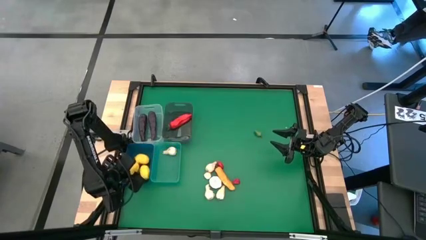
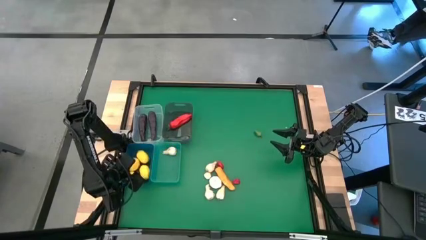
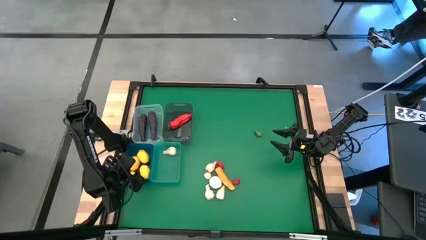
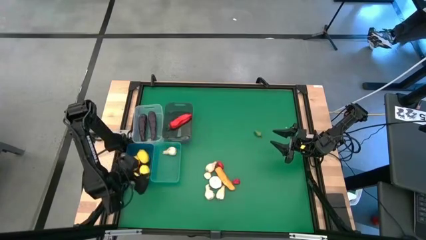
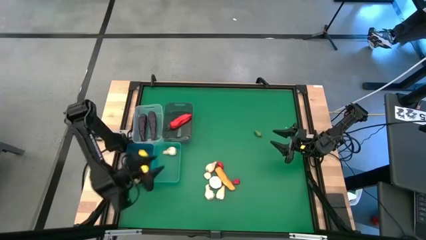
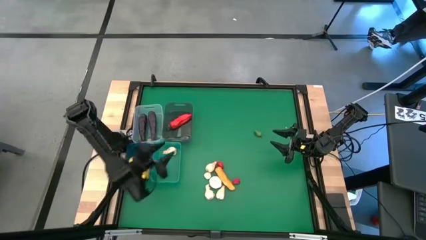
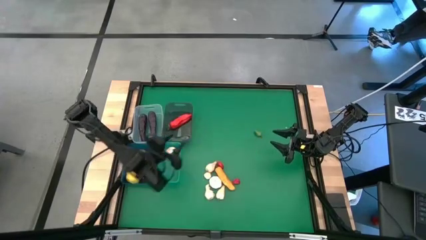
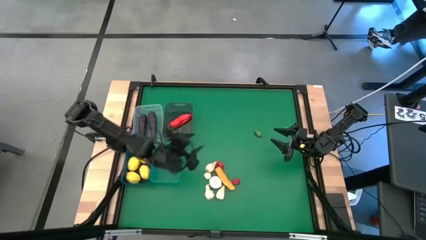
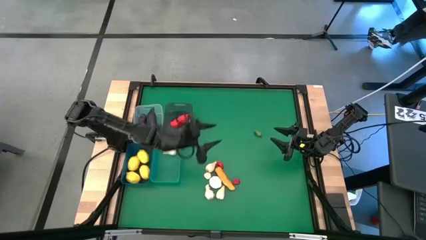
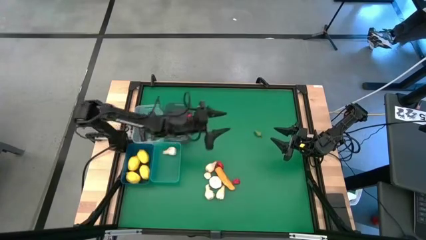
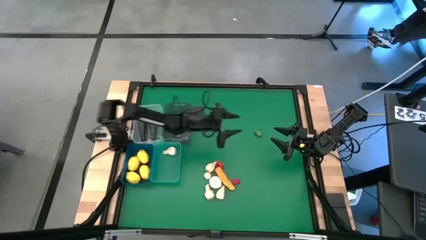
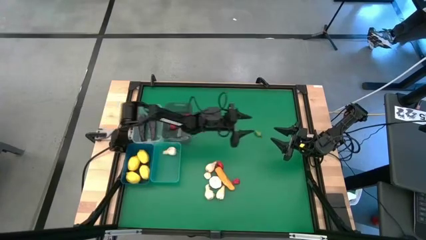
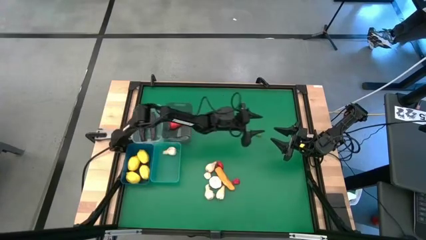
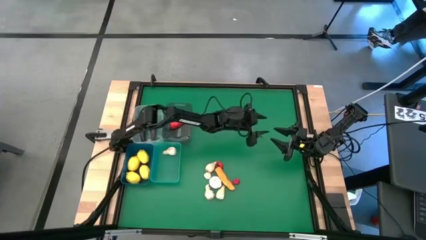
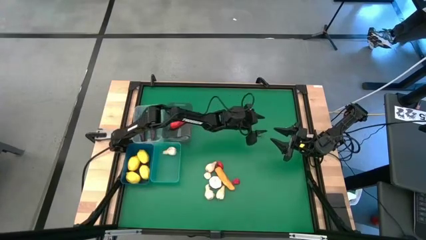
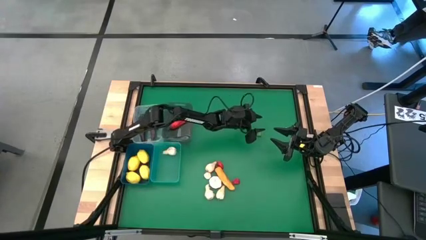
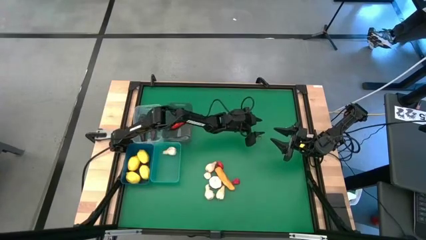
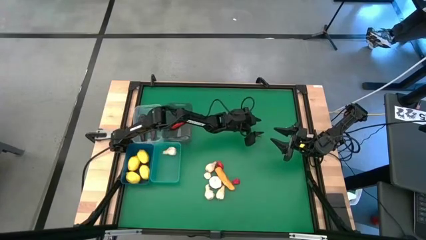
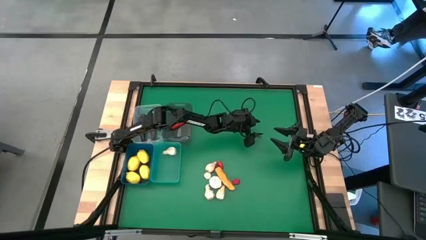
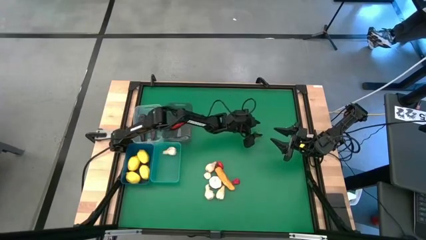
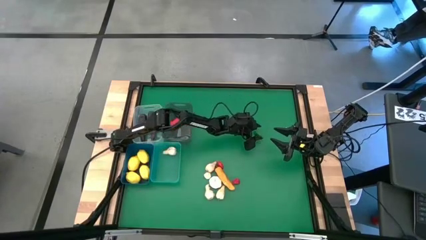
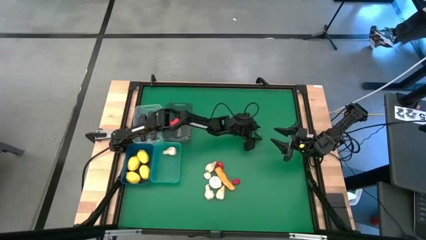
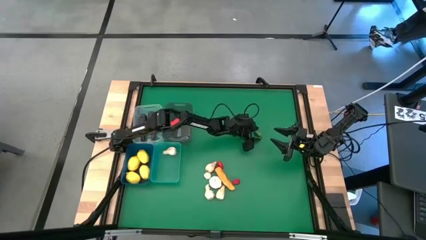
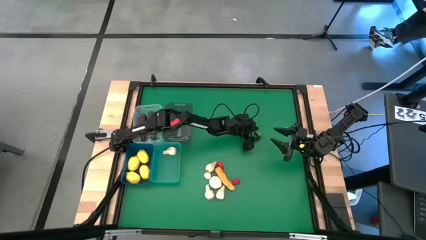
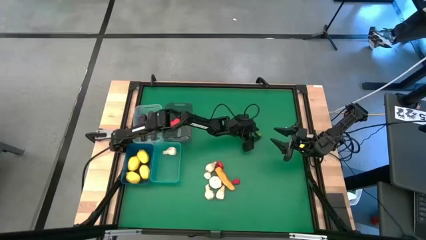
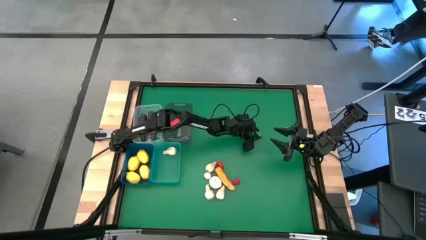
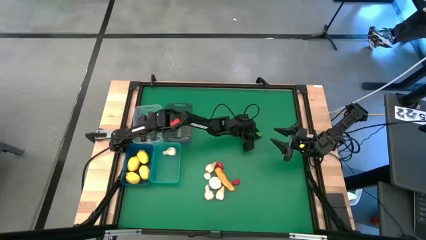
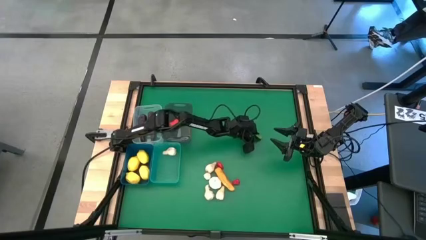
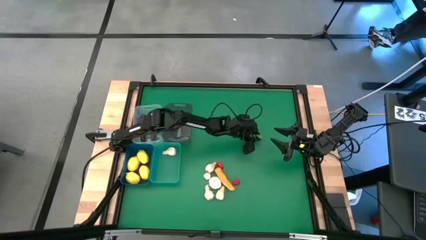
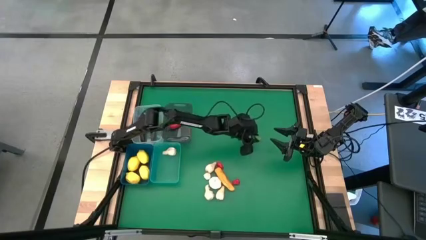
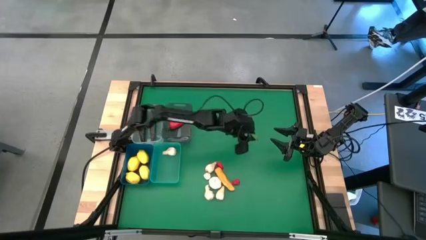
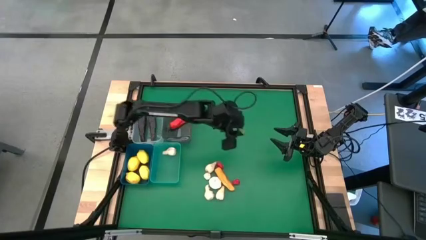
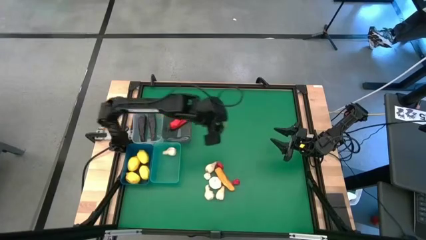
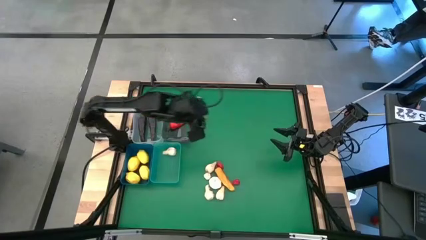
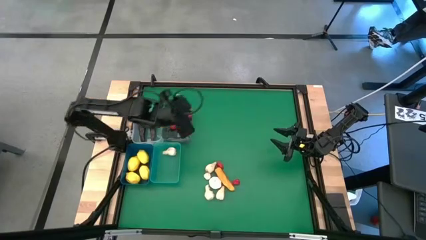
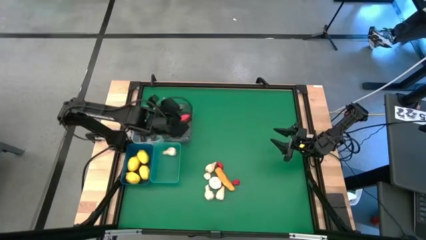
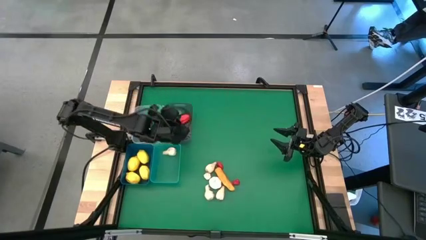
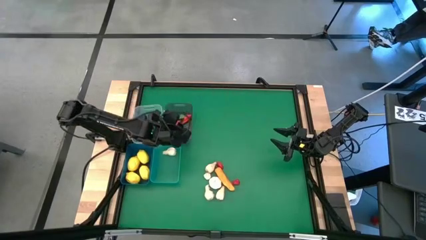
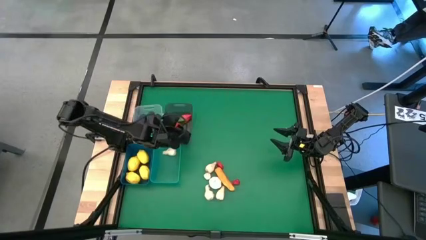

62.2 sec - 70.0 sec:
Task: Sort produce into baskets
Put the green chili pepper into the black bin

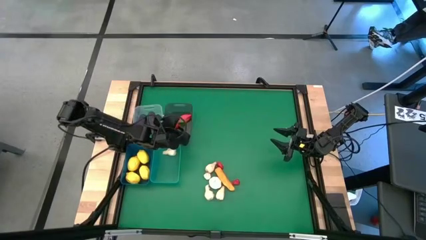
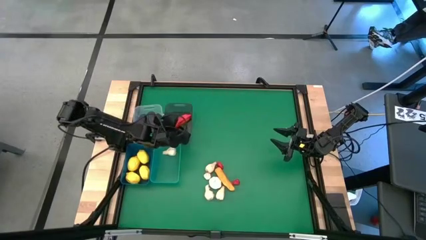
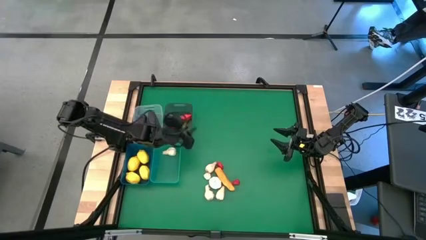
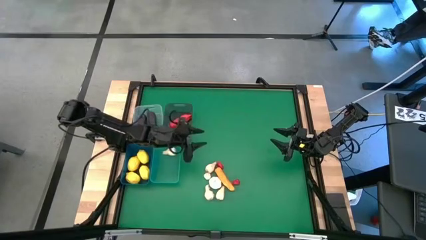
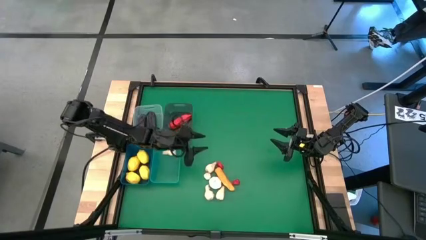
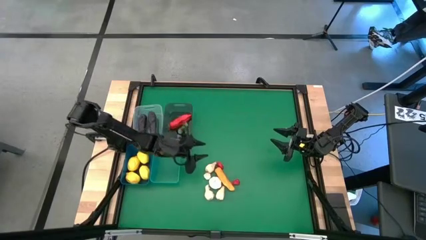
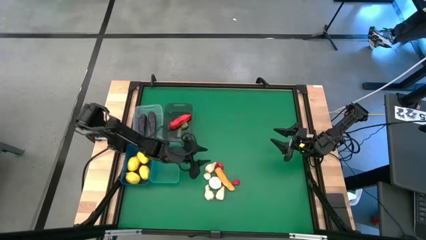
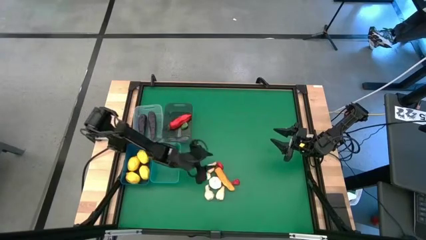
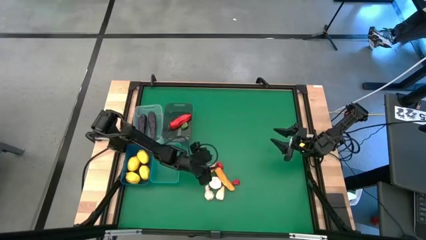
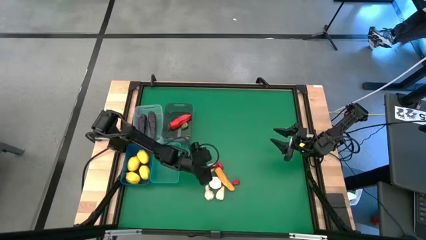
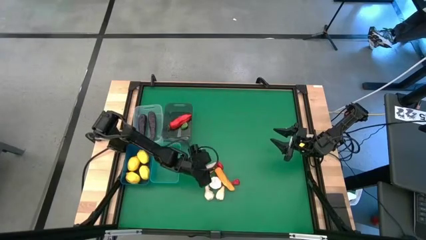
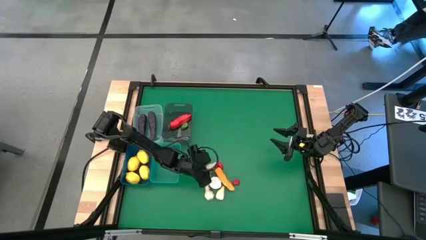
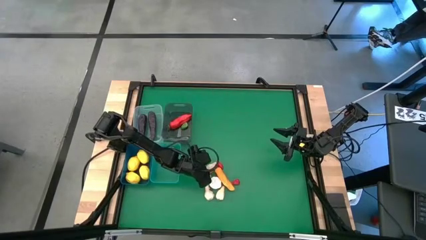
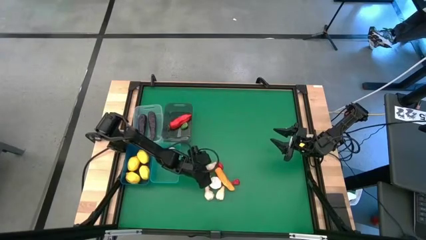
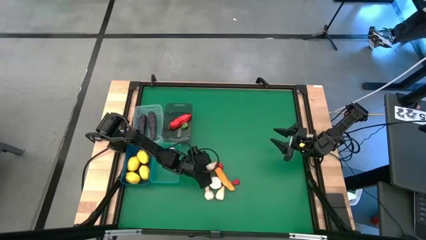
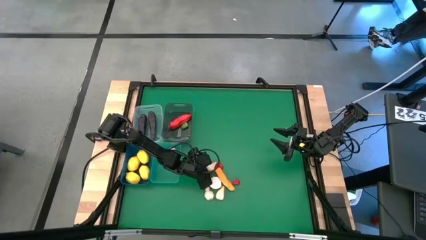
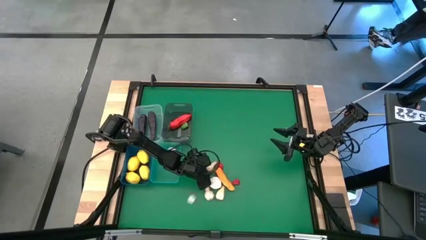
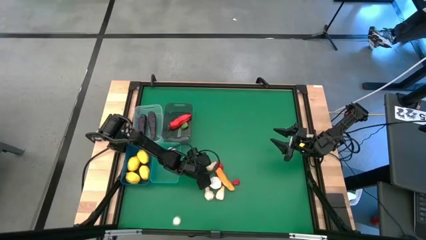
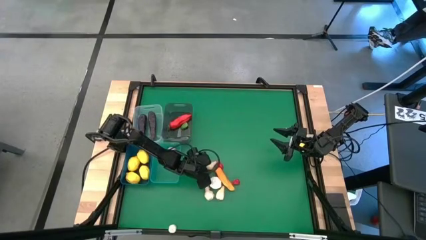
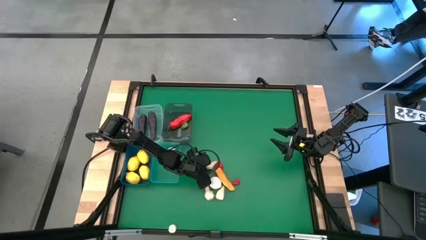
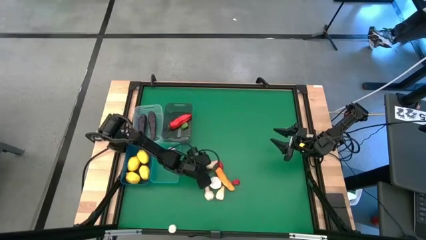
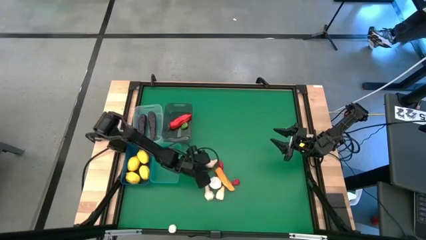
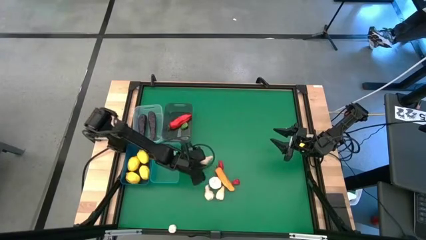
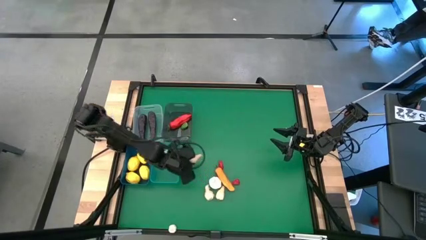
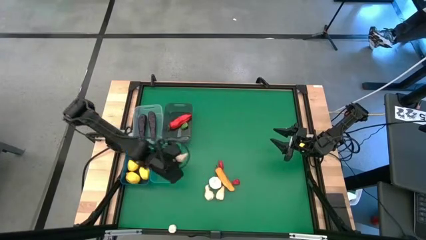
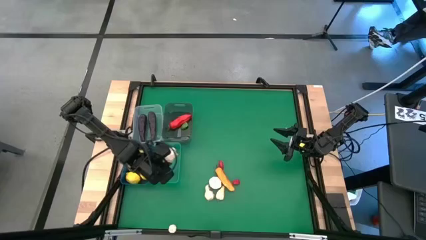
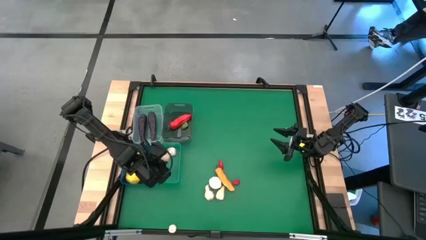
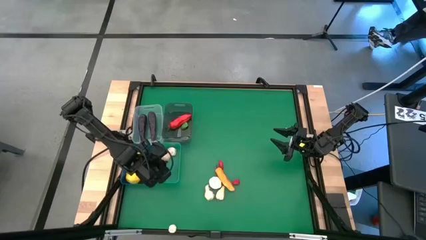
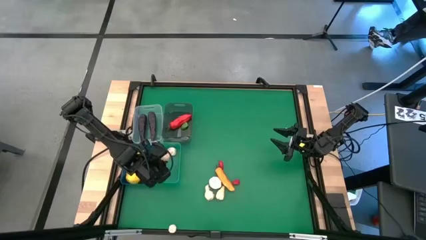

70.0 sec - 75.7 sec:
Put the white garlic into the green bin

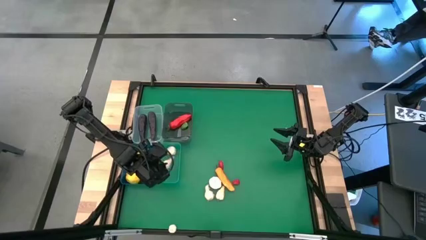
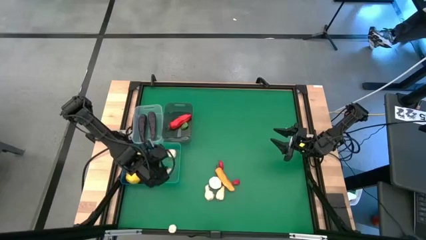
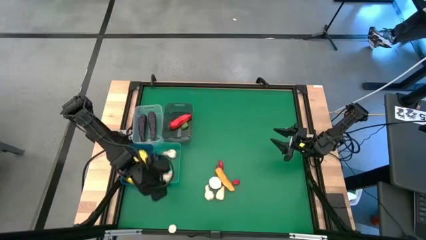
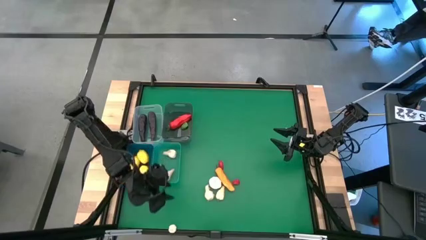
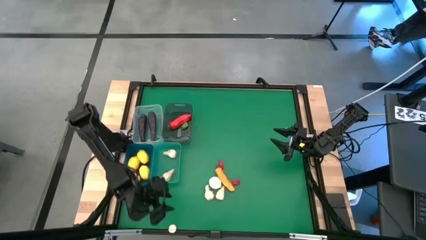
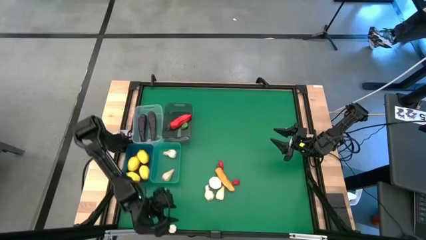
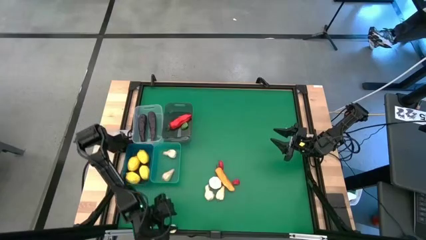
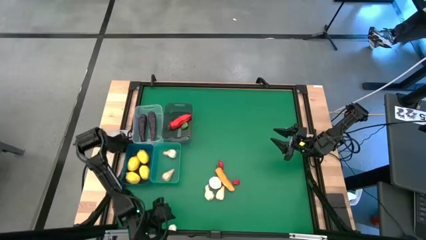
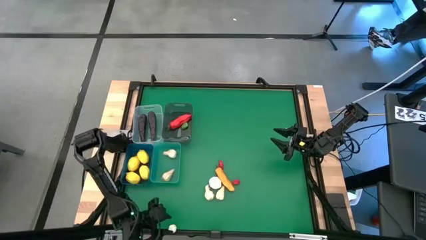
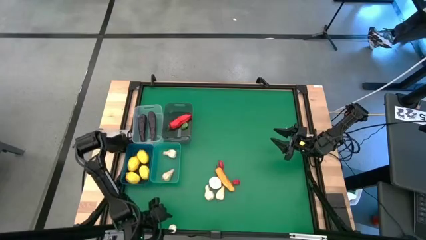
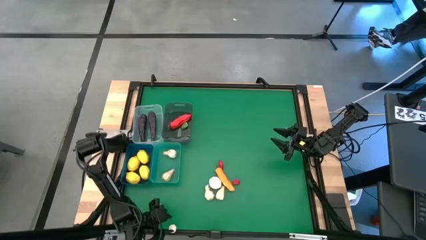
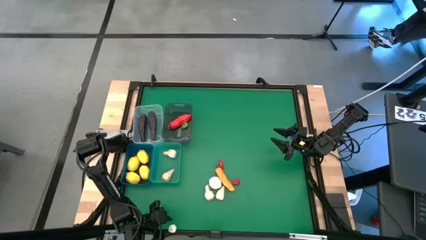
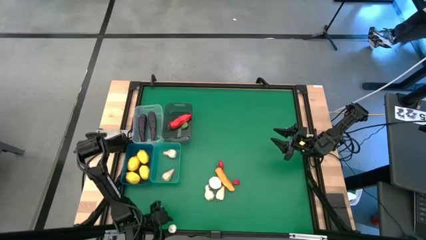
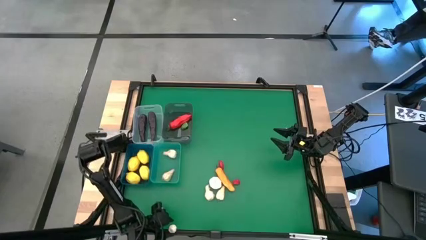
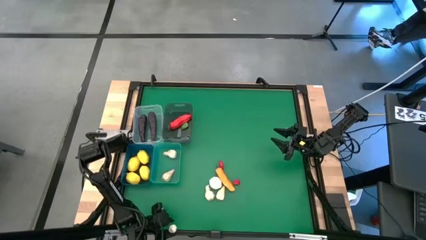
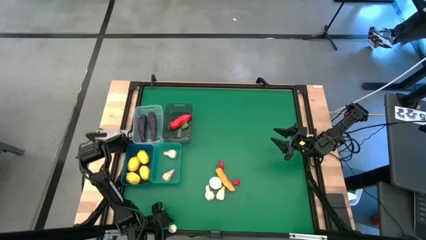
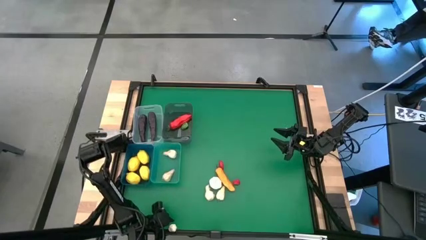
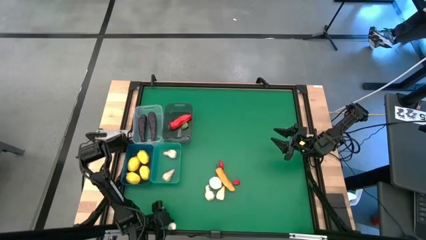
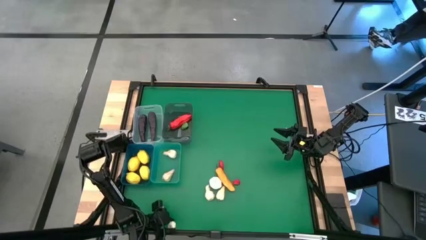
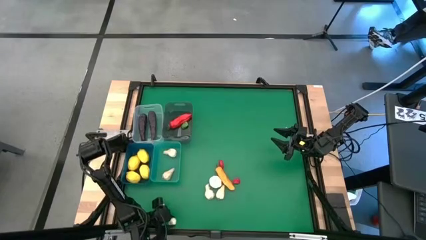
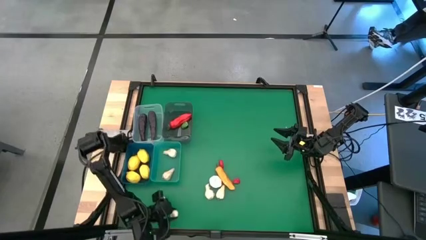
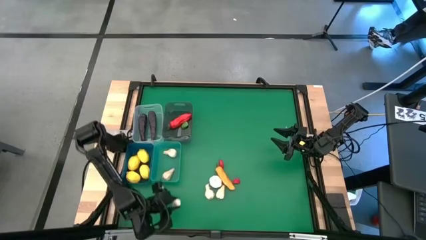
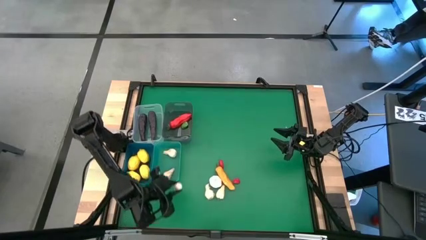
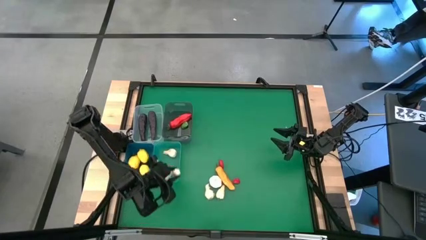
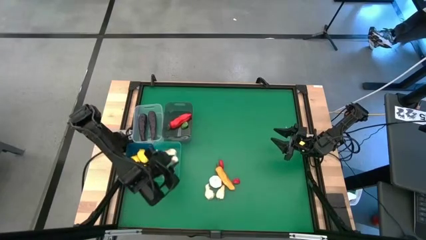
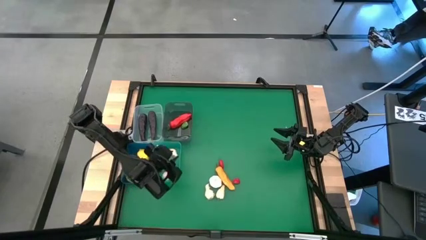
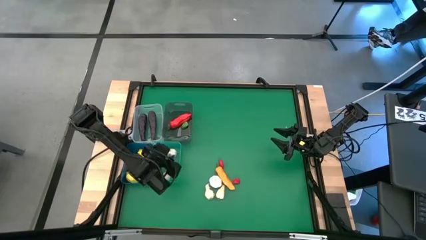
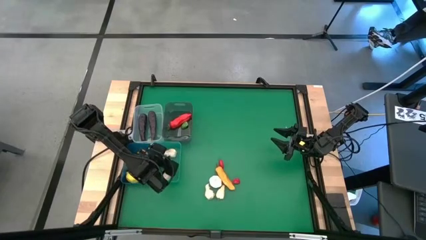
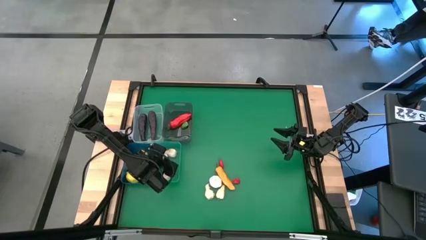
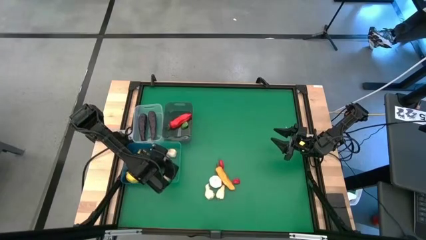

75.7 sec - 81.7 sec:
Put the white garlic into the green bin
